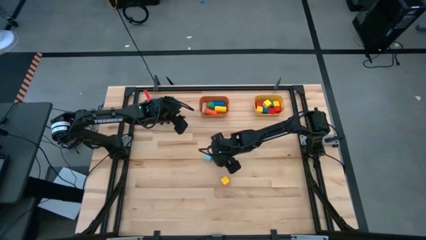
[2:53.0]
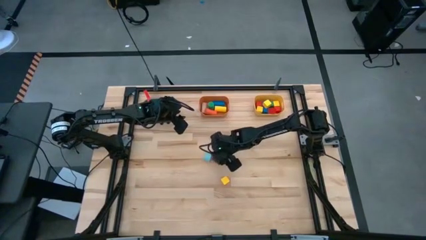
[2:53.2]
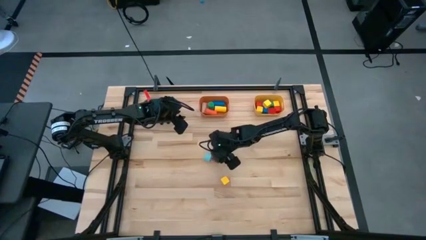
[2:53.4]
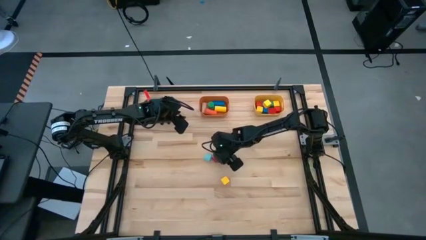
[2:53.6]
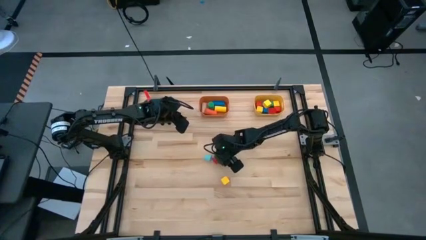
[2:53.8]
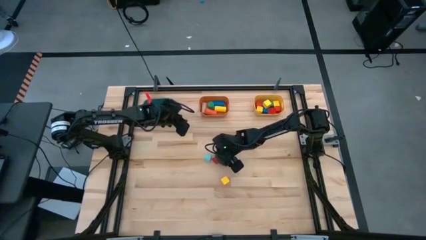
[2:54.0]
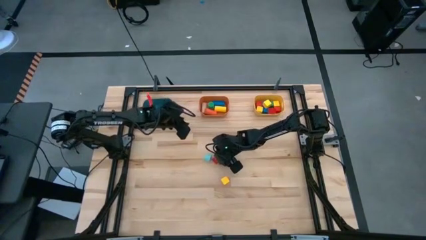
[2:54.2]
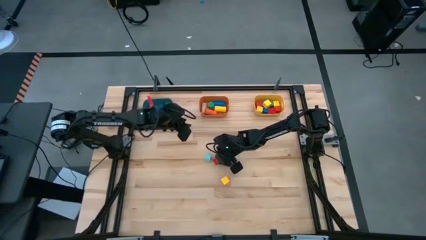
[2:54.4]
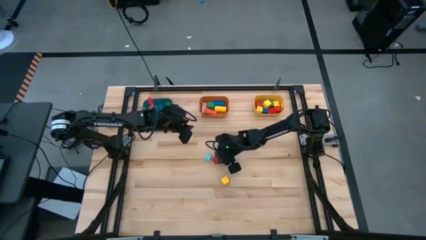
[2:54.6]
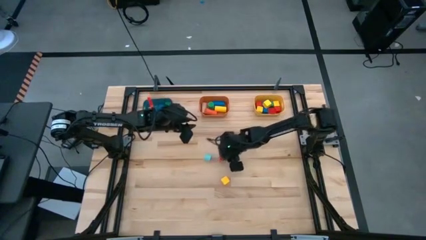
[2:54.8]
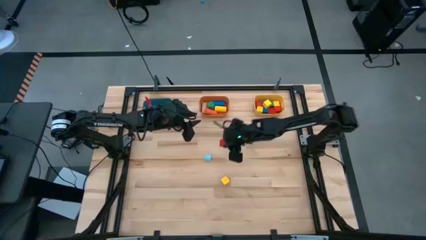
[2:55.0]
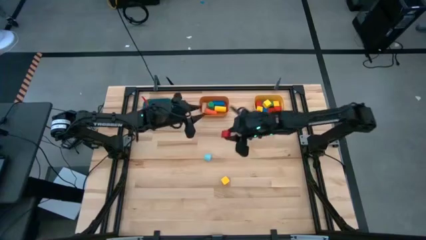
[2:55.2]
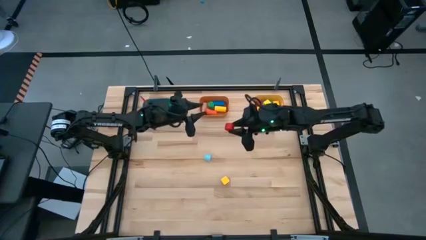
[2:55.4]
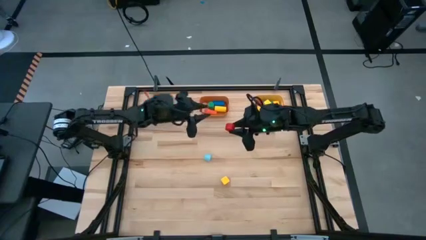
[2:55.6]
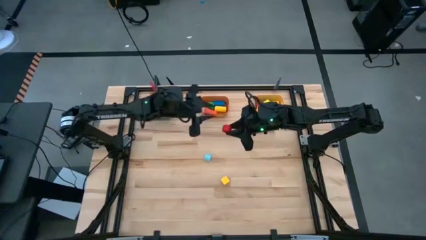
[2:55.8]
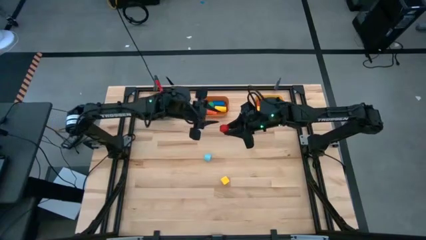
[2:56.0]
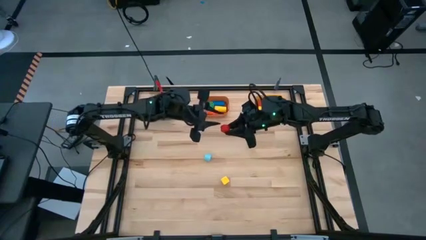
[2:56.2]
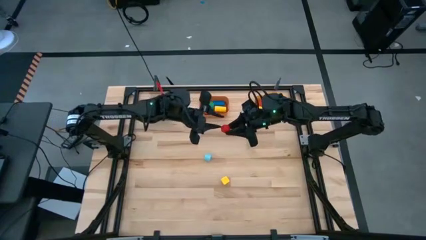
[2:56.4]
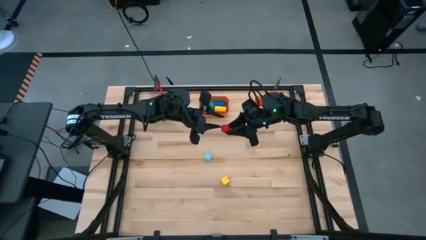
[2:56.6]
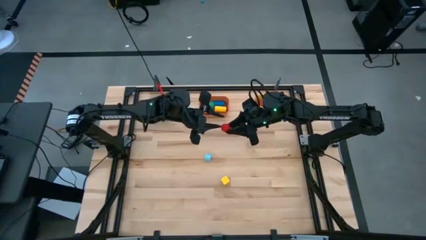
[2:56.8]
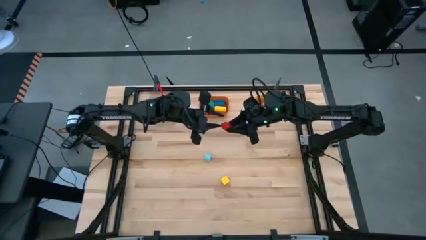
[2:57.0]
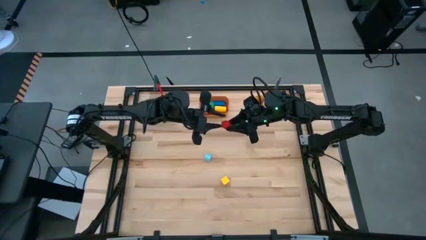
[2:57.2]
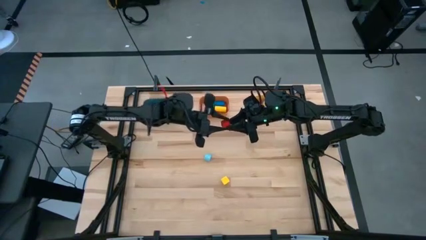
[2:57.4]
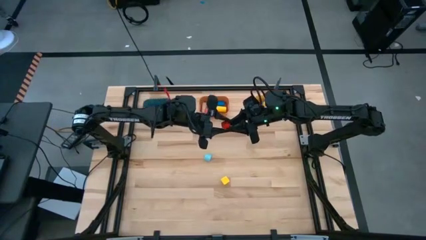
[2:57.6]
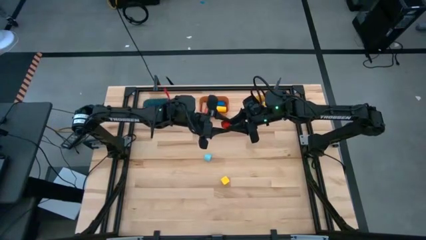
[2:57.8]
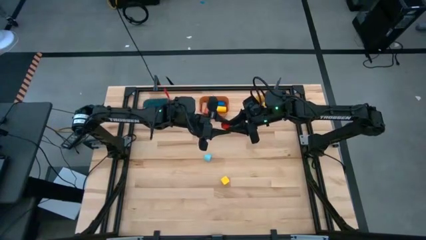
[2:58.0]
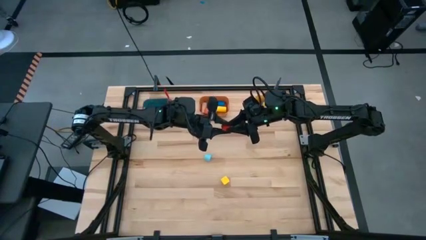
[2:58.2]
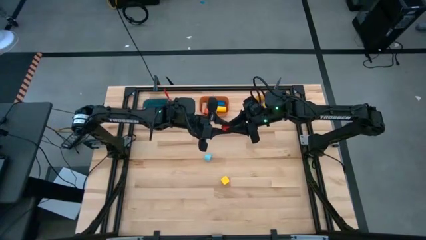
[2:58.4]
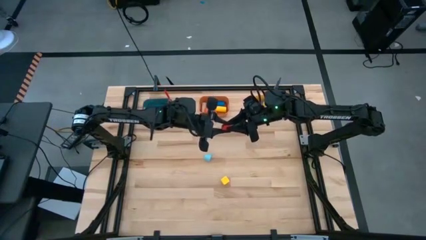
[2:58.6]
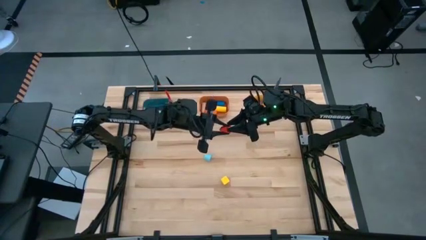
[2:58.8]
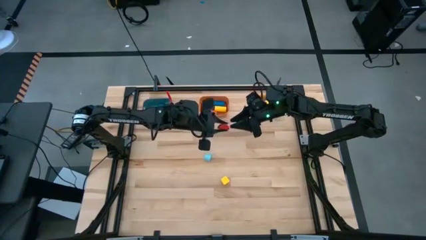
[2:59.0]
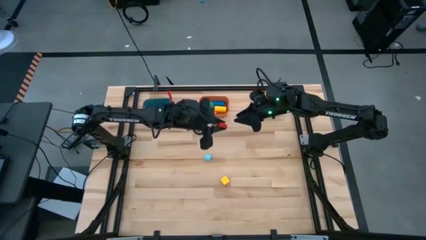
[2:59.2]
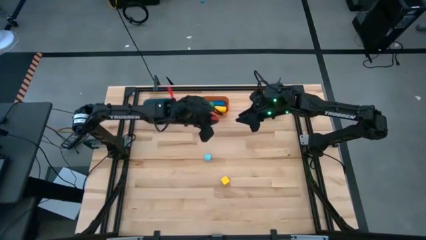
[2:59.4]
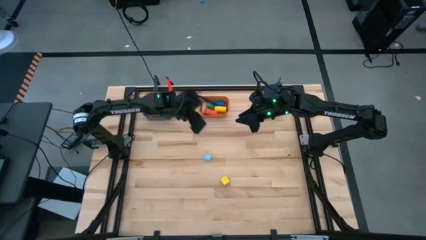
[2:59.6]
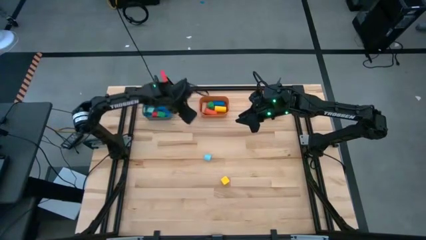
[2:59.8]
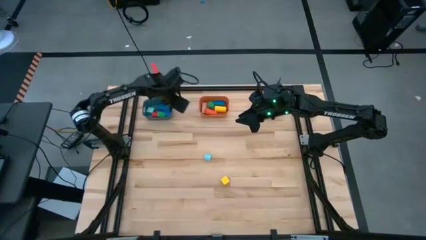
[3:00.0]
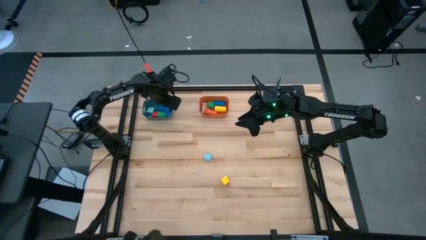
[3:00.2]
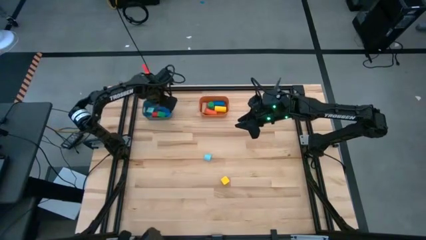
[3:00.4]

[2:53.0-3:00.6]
Task: Sort blocks by size
Put the red half-circle block into the blue bin

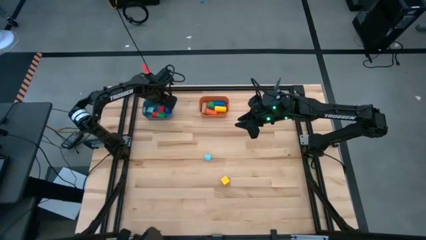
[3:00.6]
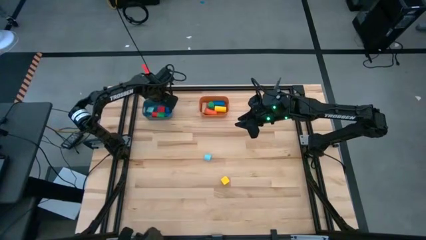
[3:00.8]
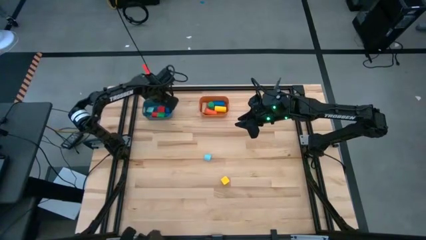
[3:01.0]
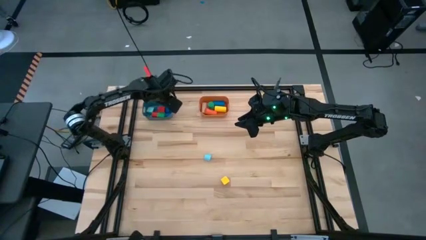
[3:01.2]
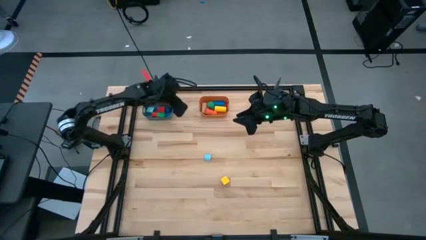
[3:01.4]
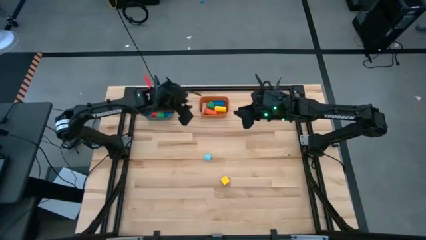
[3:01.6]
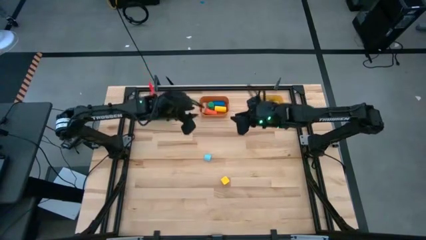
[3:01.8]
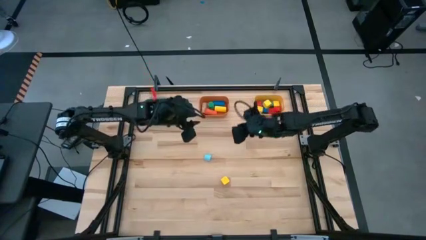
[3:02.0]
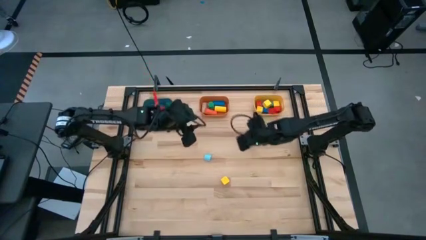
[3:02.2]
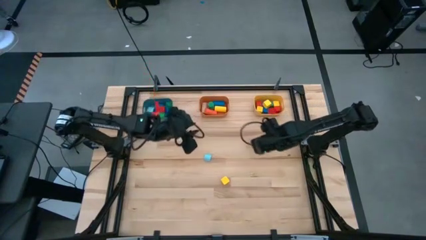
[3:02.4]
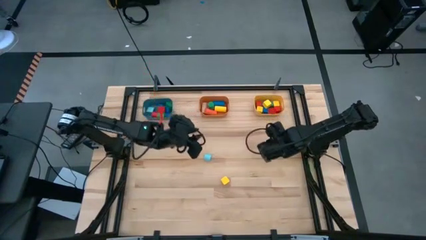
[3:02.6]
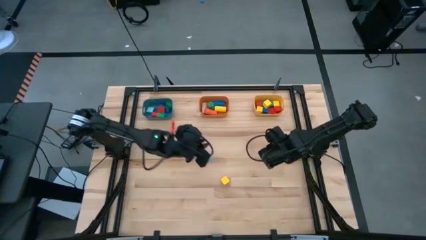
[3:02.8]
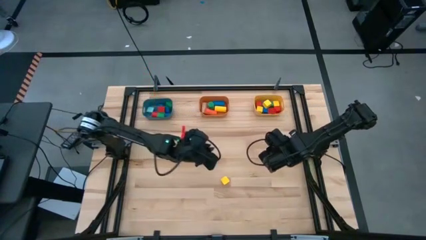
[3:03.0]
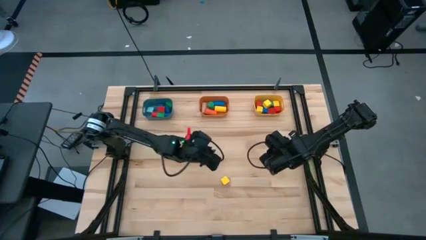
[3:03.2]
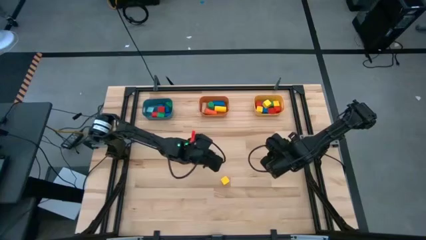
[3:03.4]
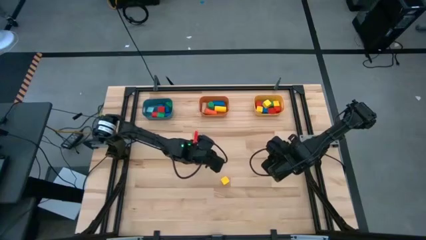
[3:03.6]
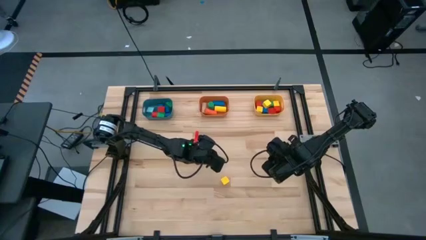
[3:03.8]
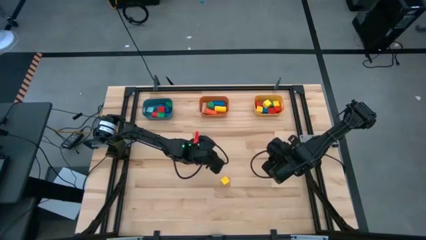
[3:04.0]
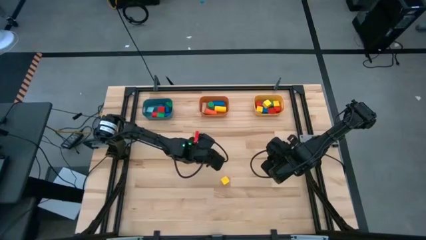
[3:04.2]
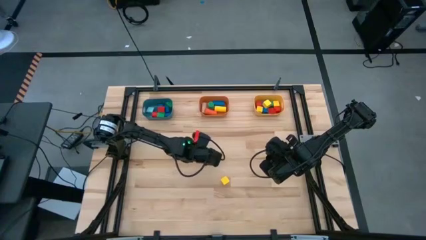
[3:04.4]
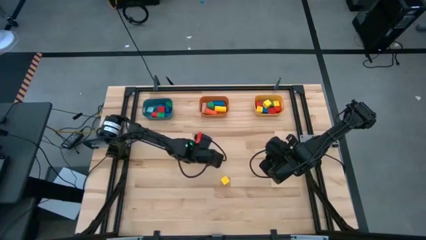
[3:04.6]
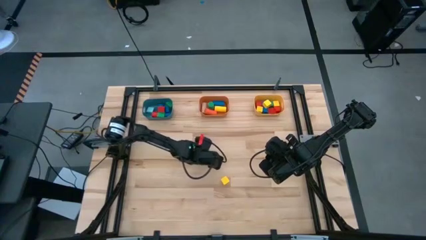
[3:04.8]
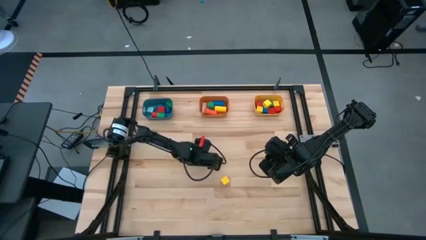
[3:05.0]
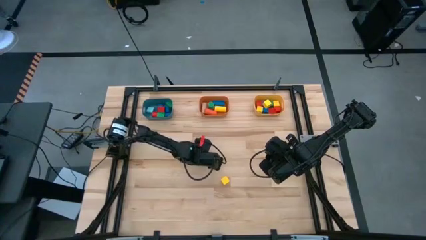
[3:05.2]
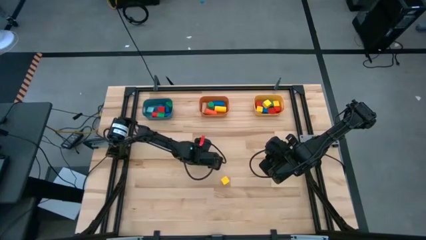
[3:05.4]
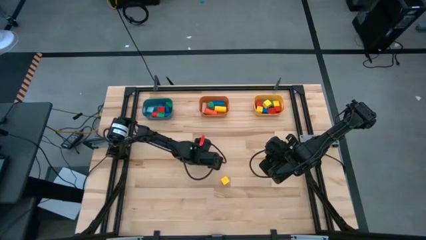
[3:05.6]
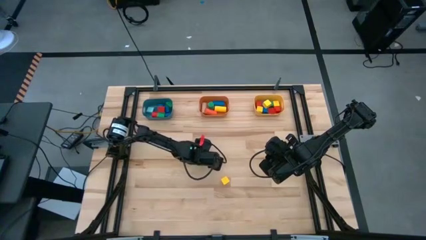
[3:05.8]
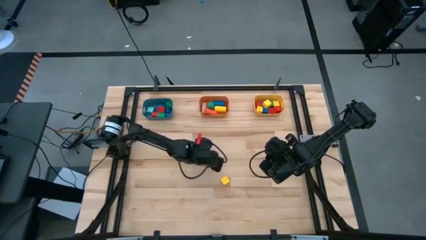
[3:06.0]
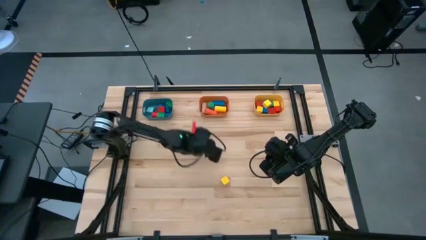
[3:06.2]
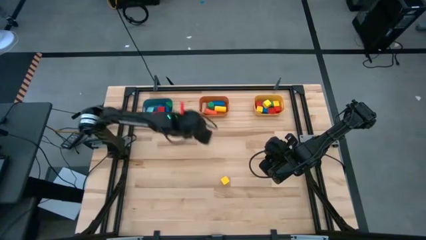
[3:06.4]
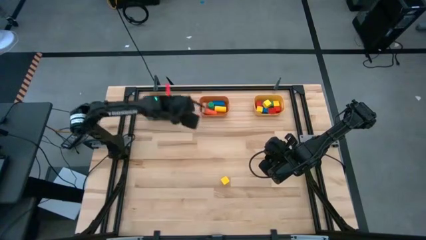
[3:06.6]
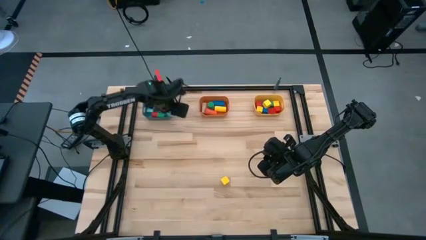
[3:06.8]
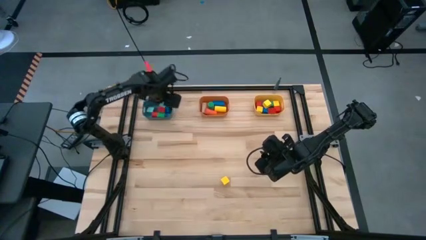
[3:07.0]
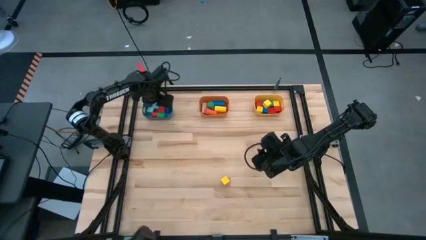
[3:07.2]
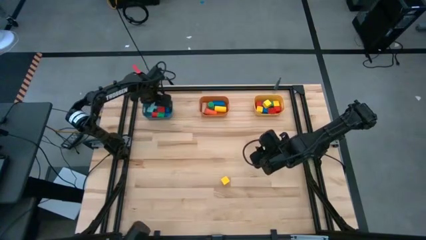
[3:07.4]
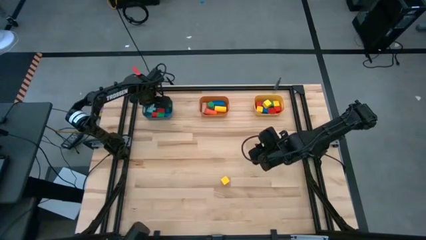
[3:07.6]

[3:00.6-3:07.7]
Put the light blue half-circle block into the blue bin

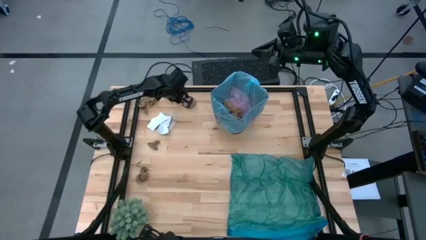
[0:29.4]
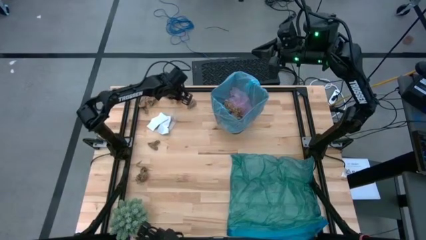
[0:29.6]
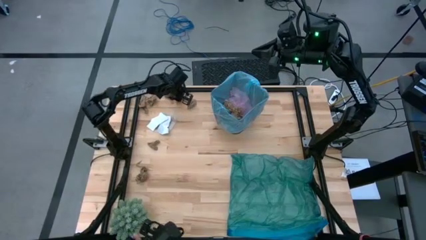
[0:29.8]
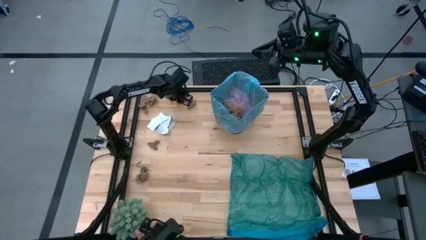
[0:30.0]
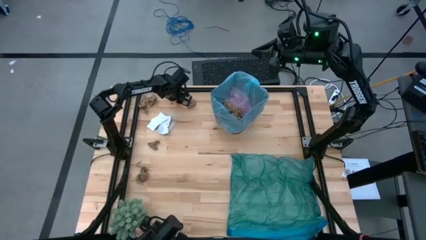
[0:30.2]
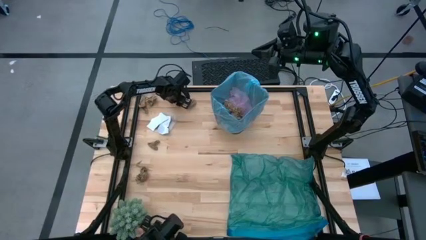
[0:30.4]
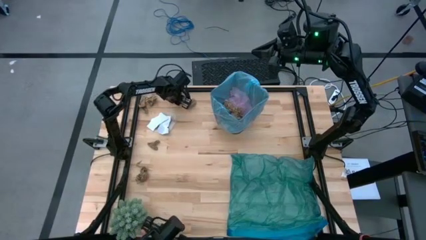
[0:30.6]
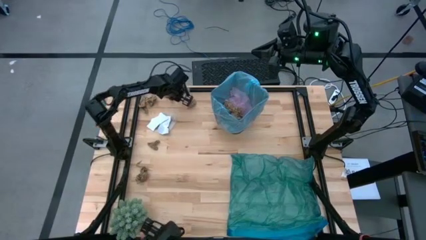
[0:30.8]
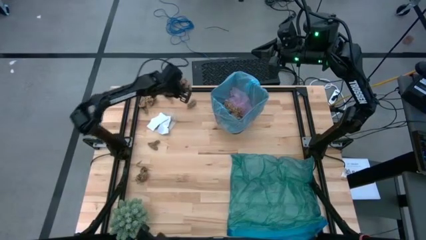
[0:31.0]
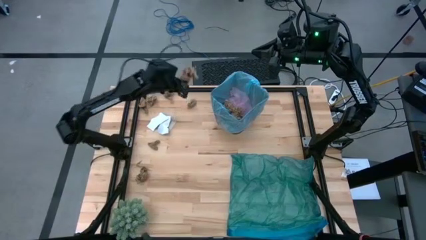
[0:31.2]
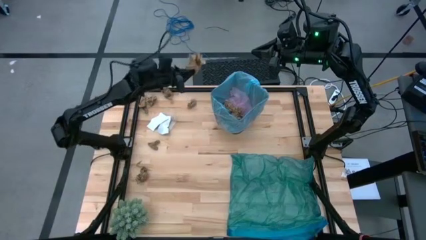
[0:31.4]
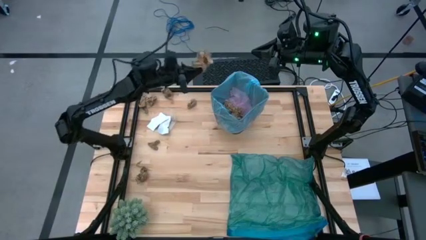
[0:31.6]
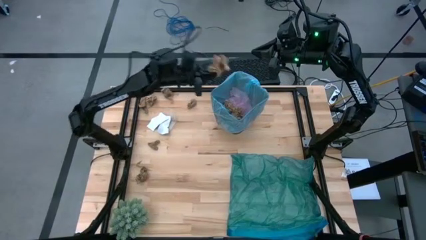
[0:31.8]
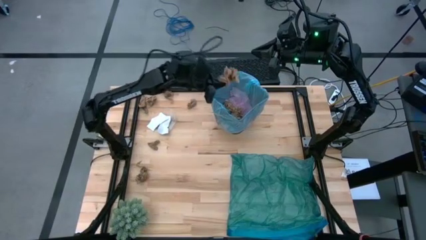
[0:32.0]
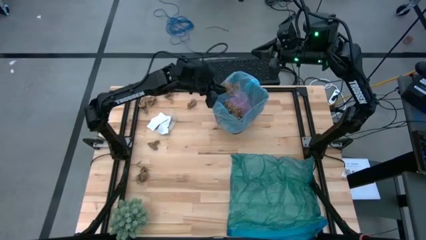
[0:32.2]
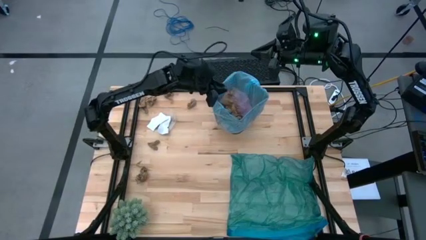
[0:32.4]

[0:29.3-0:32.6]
Task: place trash/remove bag and relplace
Put the brown napkin into the black trash bin
